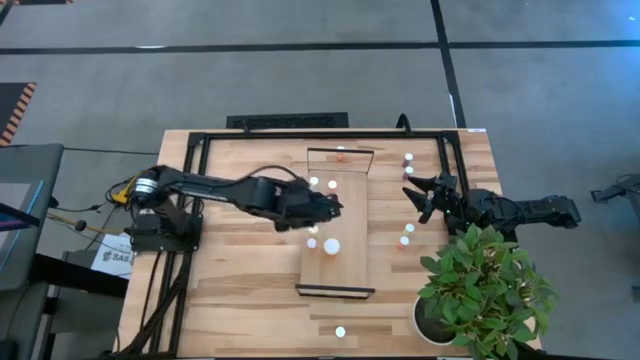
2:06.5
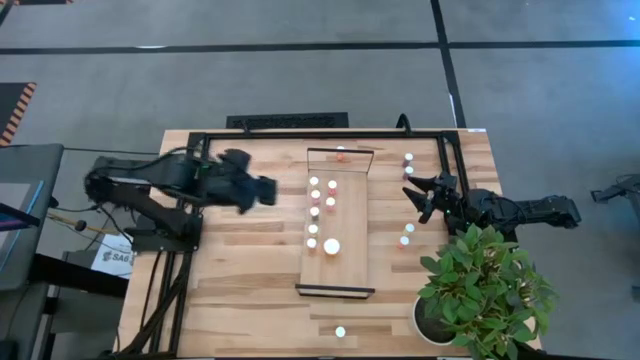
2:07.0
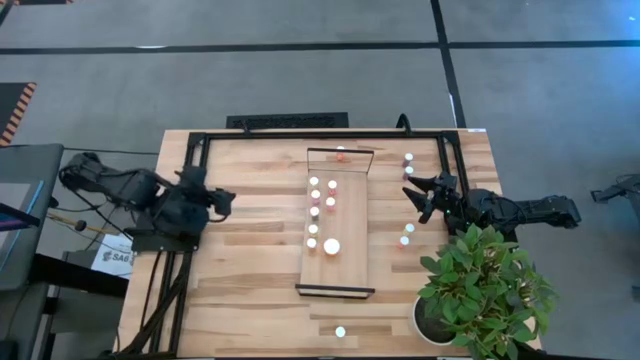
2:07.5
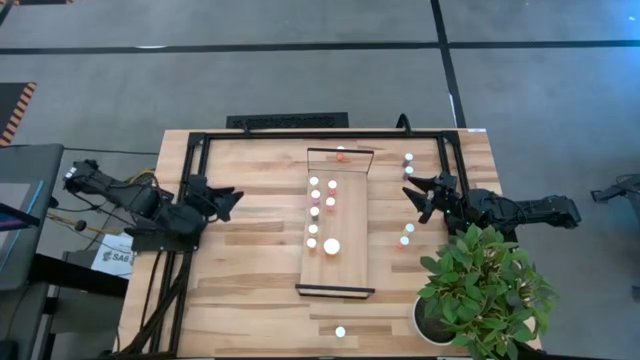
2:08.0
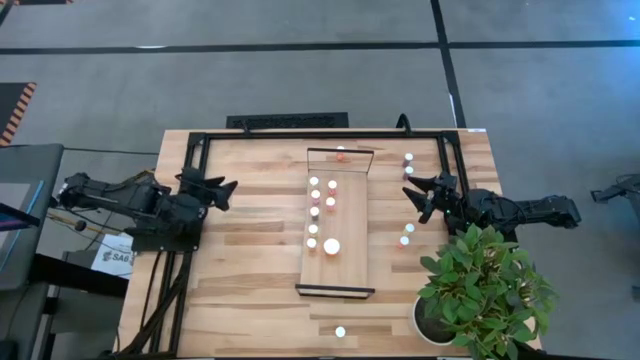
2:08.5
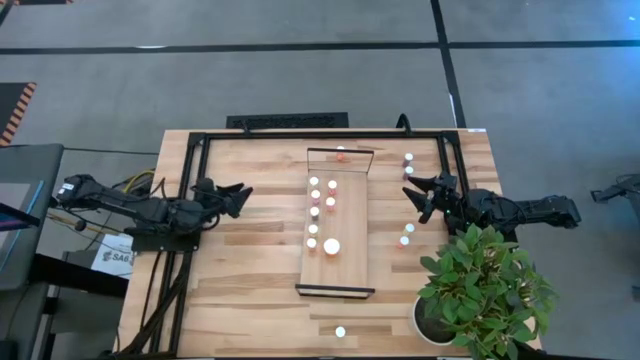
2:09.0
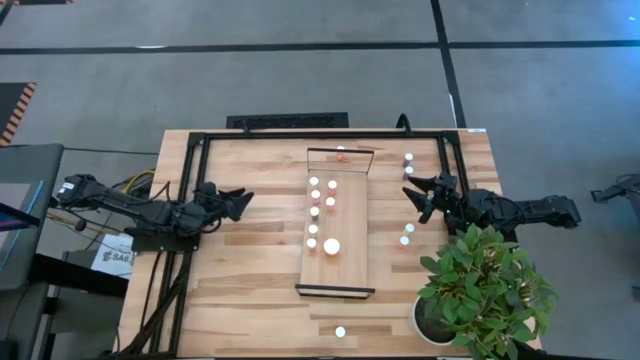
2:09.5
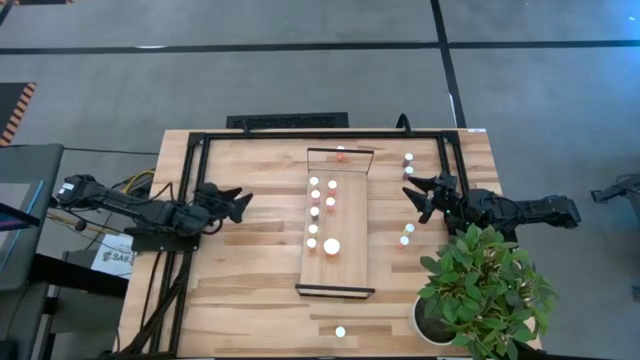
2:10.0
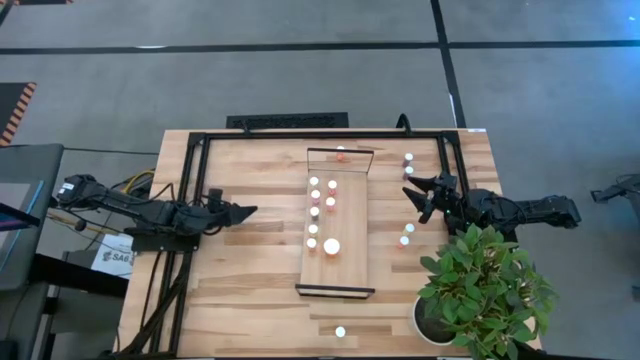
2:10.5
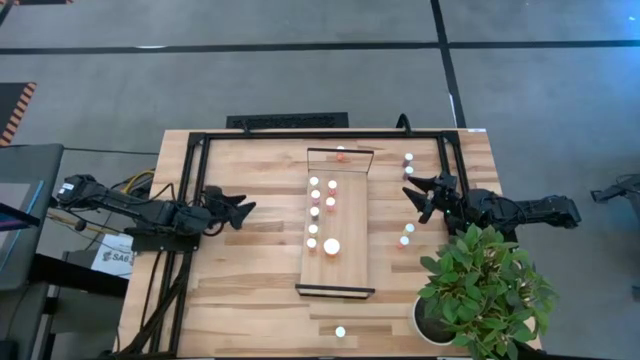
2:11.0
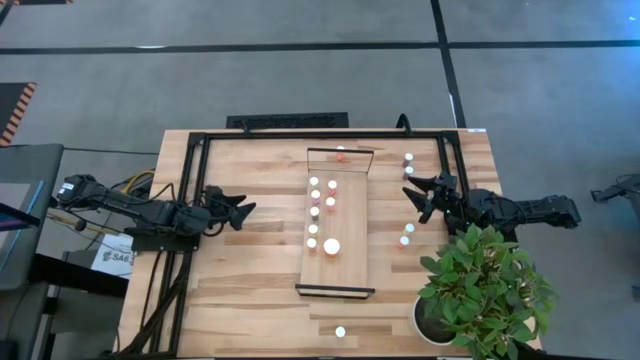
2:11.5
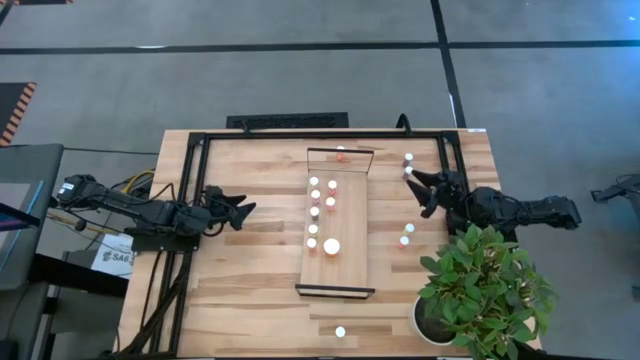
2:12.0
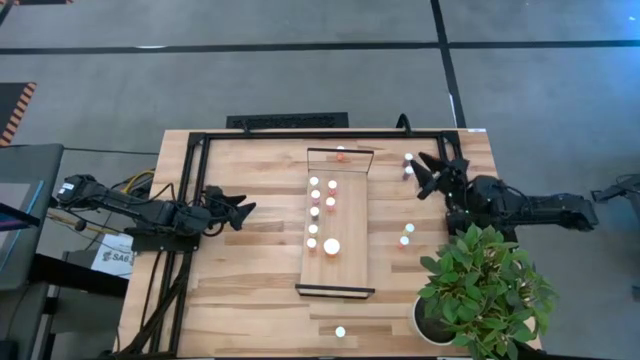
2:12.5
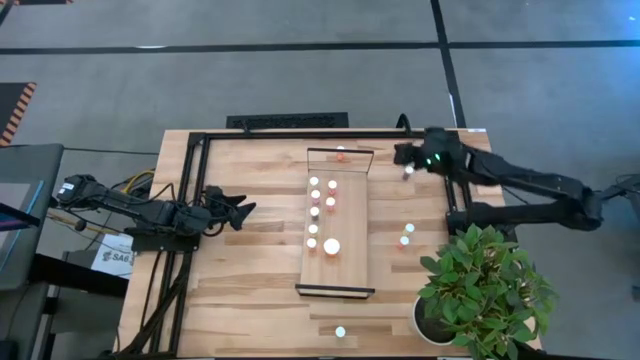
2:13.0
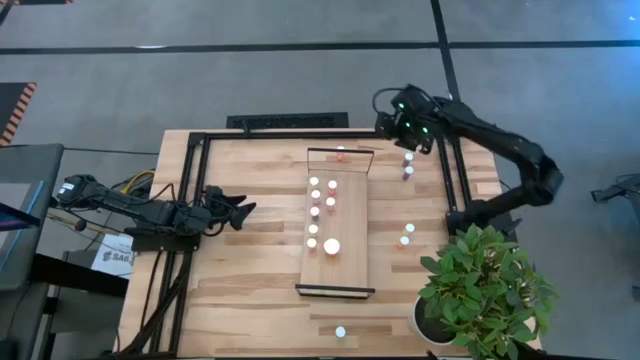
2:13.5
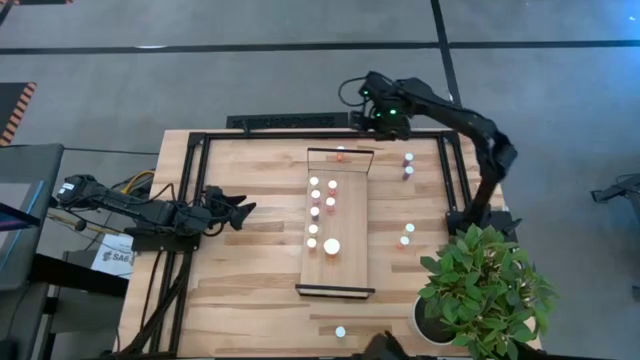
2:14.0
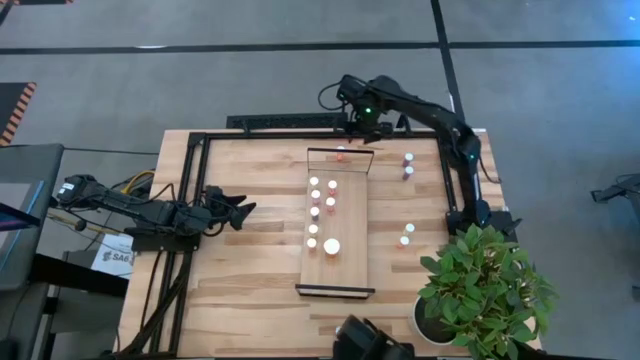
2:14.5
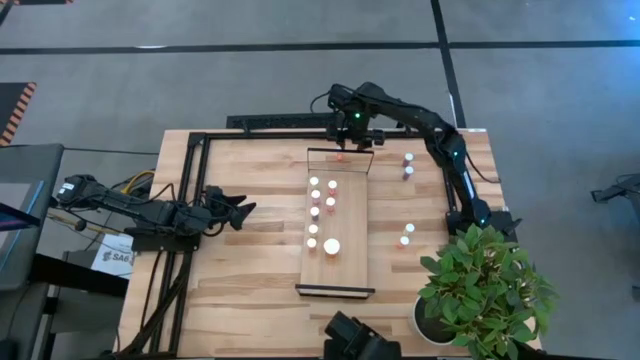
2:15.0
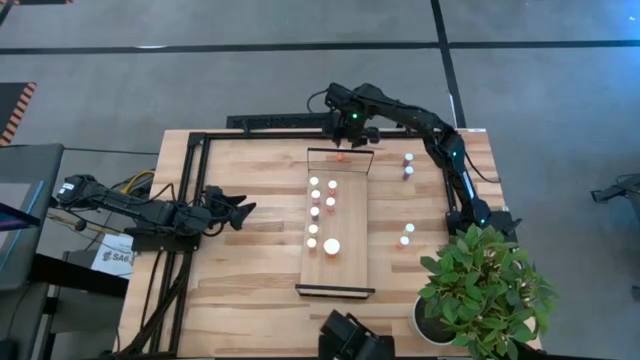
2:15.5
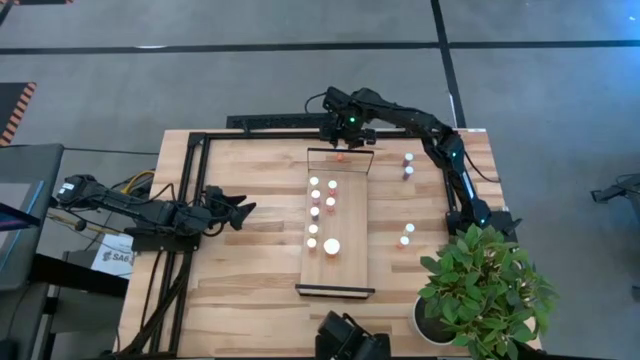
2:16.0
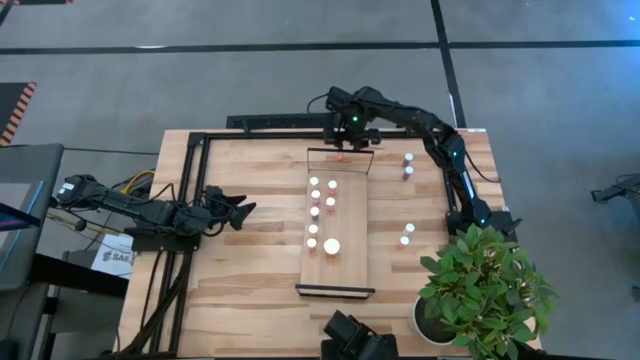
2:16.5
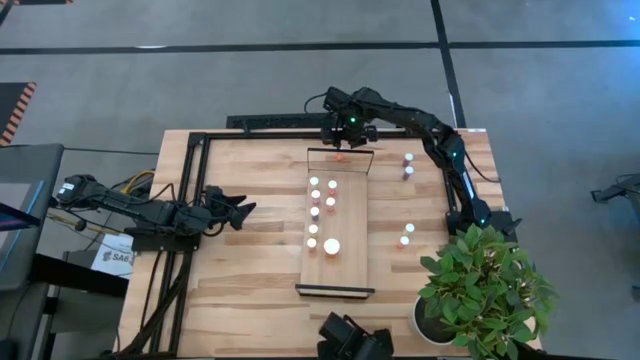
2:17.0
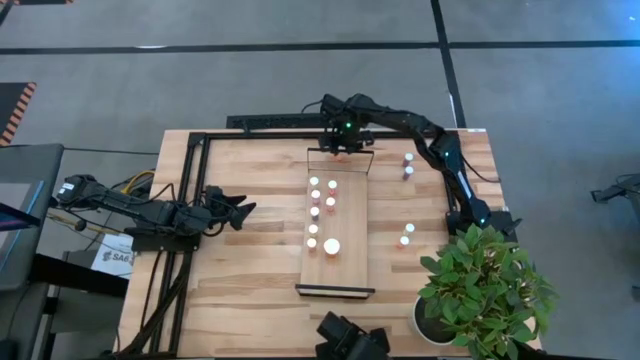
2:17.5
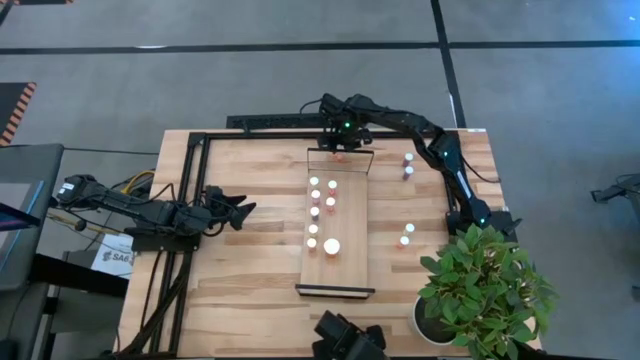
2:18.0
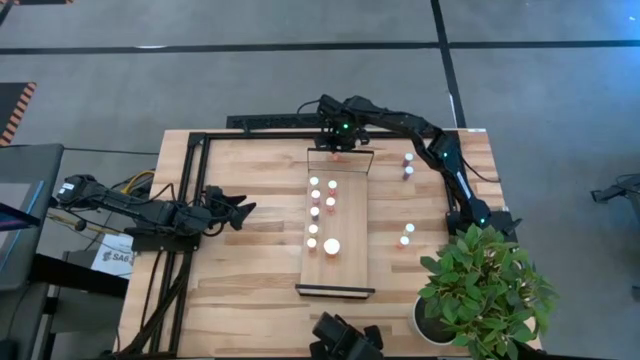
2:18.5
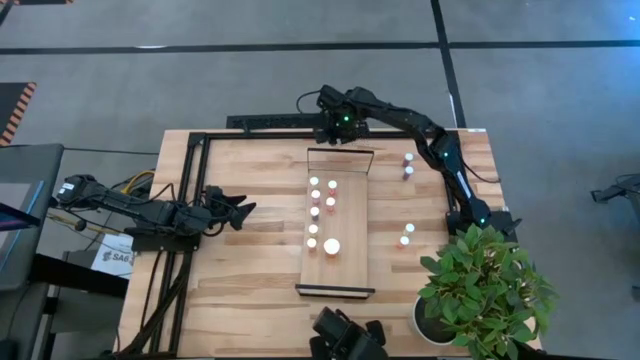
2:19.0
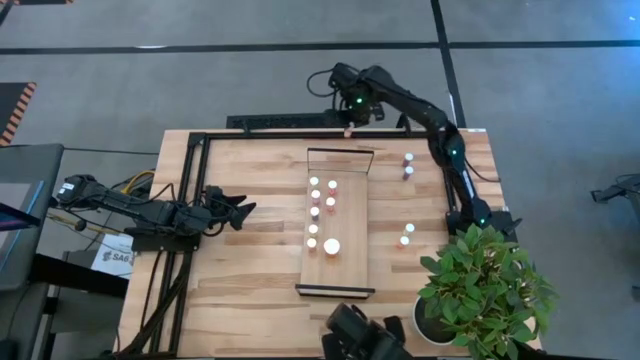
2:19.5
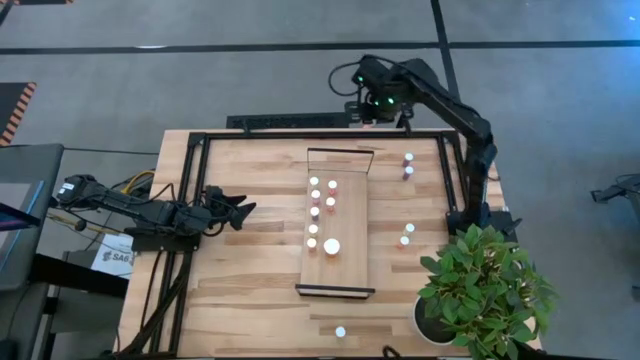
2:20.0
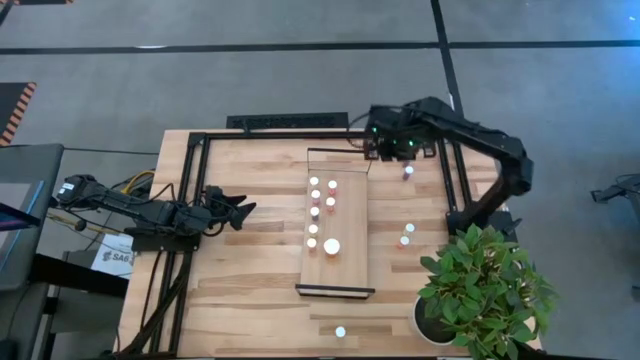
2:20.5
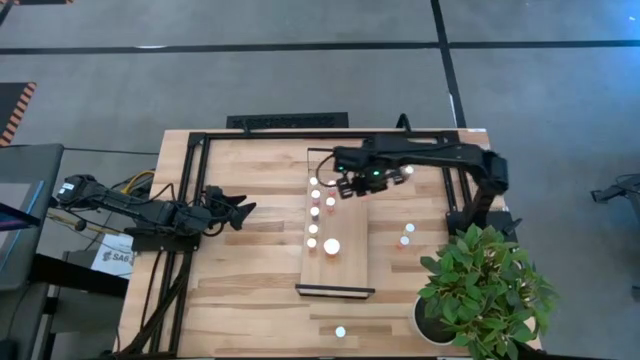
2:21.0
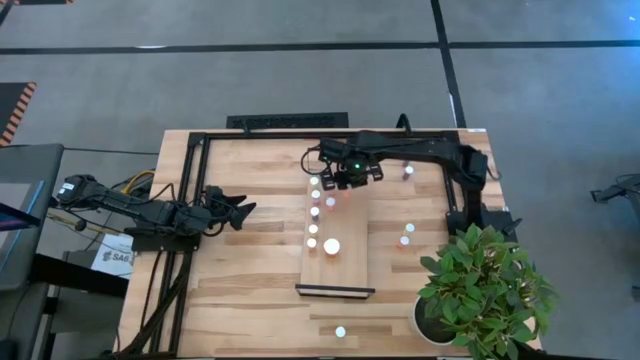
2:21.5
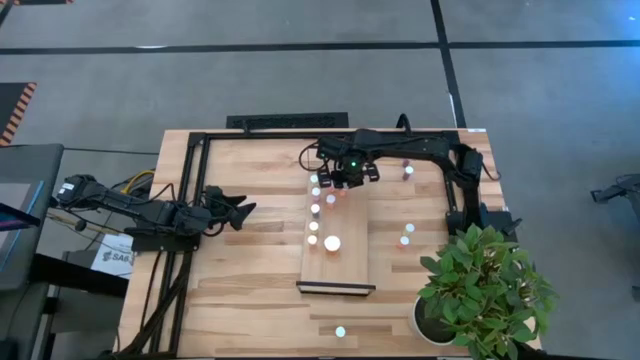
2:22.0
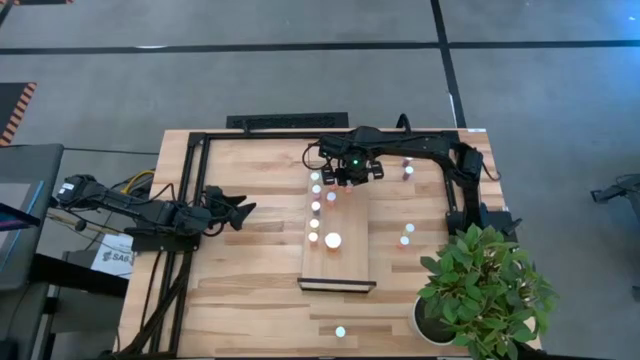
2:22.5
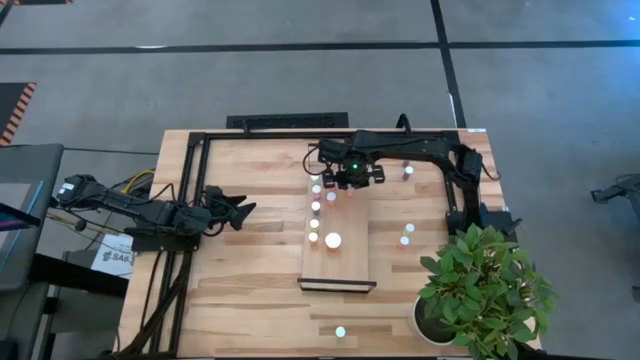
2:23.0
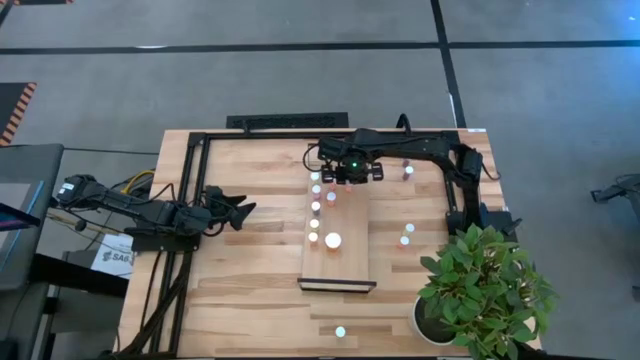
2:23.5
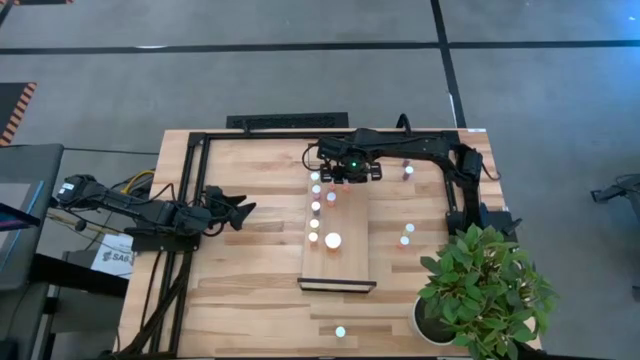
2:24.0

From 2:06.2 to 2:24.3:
Task: Pick and place medicine bottles onto shelf by color
Put the pink pill bottle on the shelf

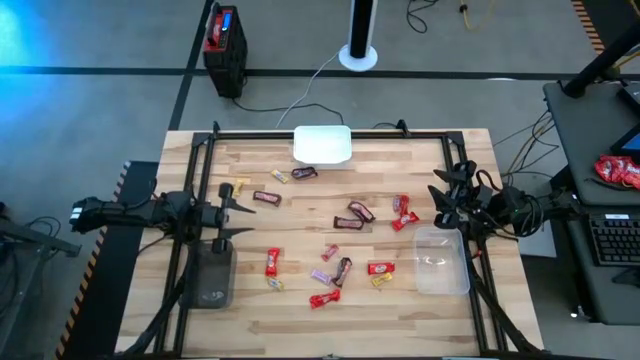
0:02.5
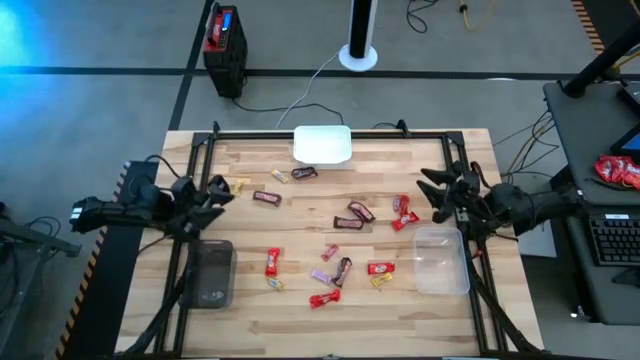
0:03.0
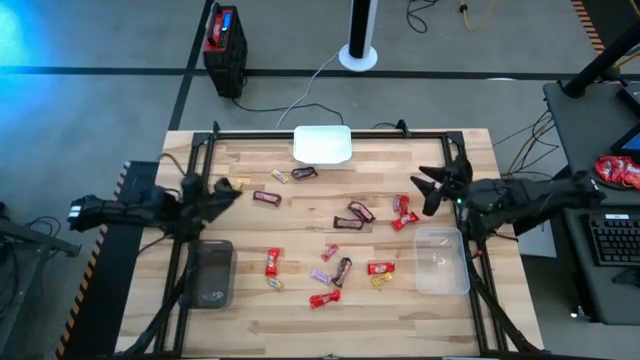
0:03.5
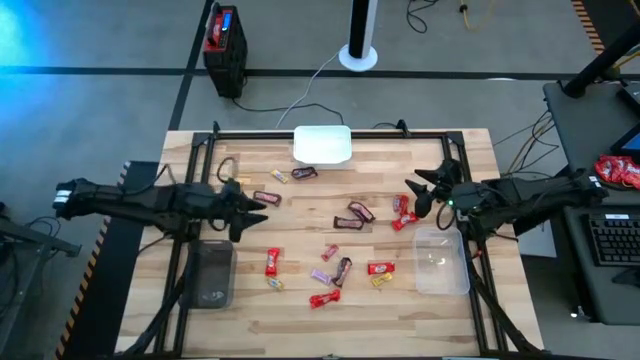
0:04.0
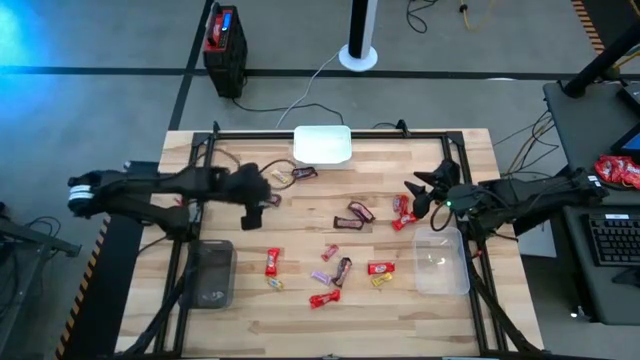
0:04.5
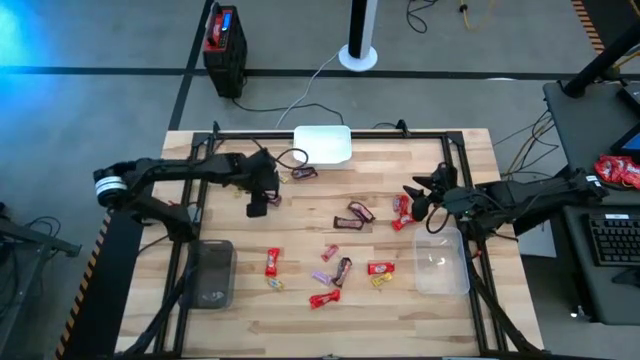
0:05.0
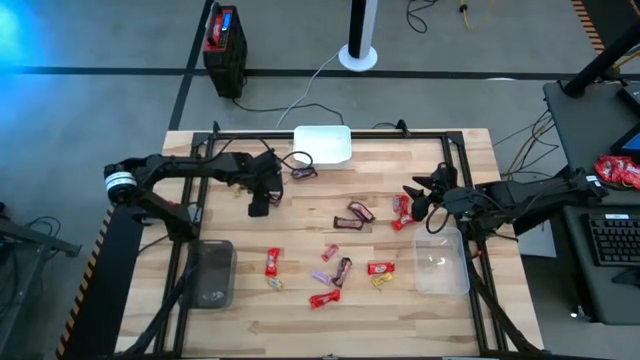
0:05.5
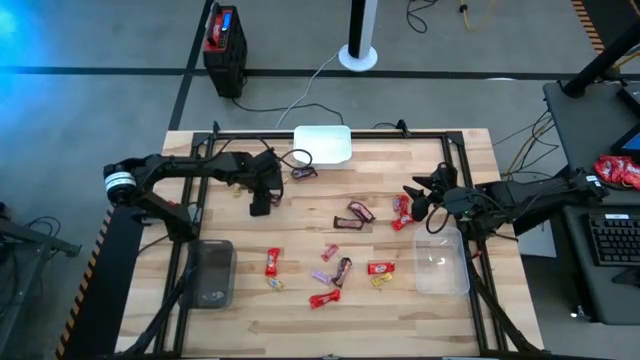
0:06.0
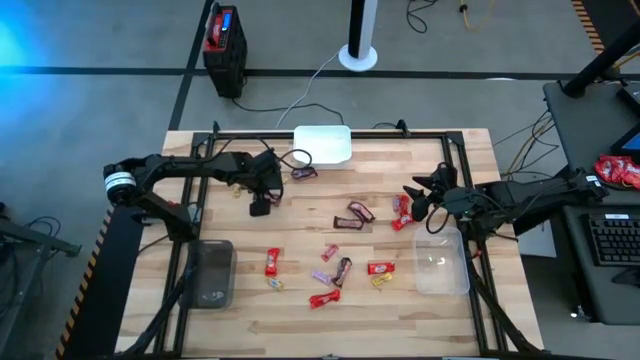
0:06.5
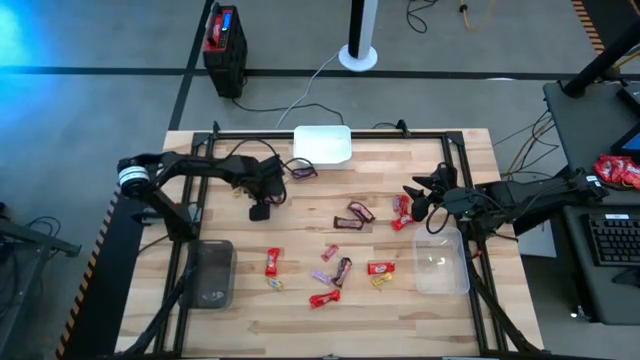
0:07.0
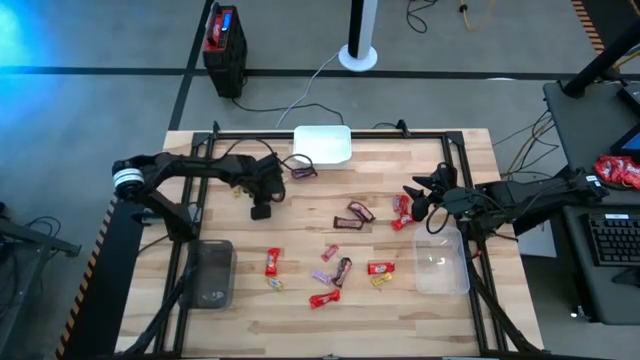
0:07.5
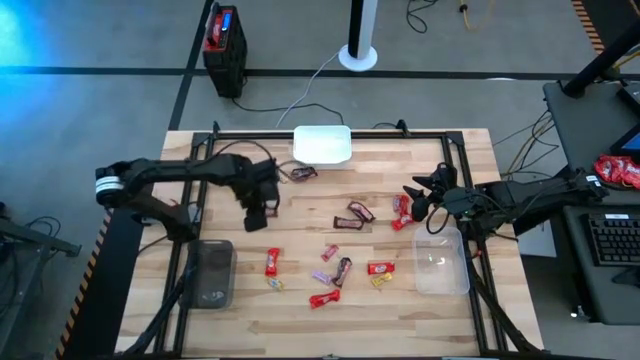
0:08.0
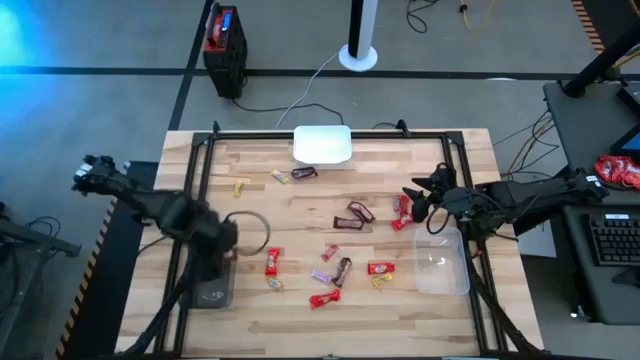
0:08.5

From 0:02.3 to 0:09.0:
Task: Sort candy by brand, put in halloween buckets
Put the brown chocolate bar into the black bin
